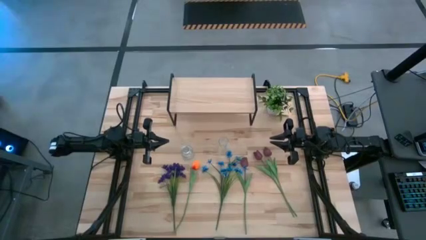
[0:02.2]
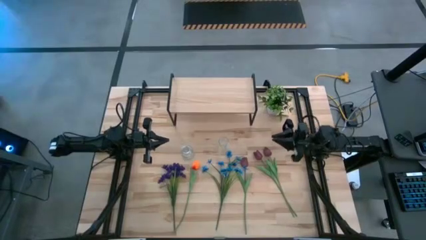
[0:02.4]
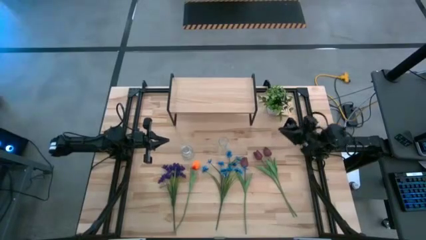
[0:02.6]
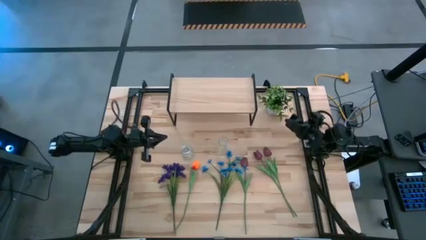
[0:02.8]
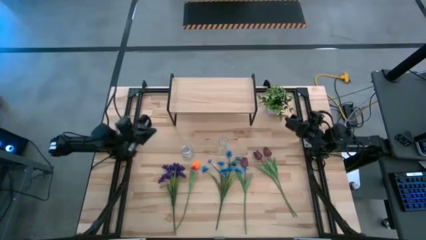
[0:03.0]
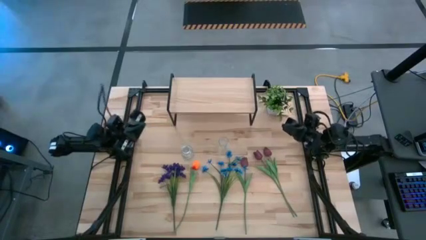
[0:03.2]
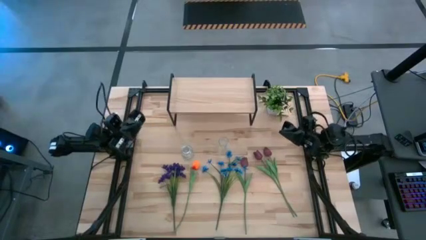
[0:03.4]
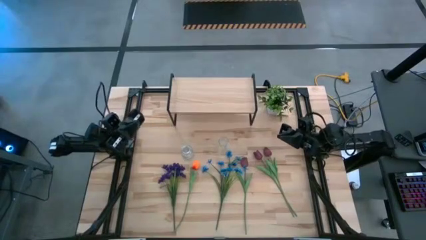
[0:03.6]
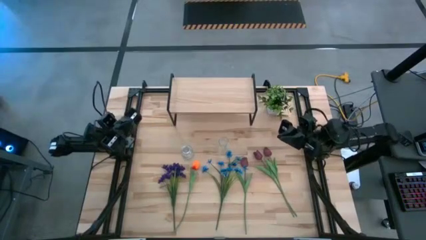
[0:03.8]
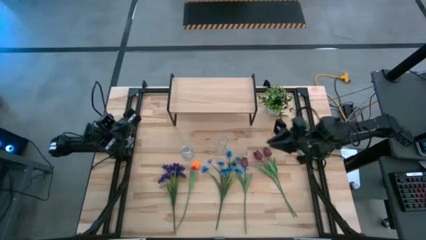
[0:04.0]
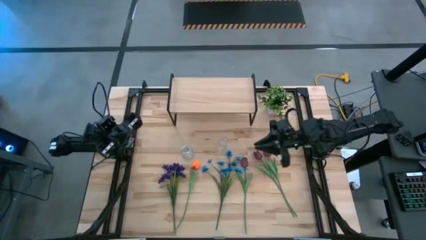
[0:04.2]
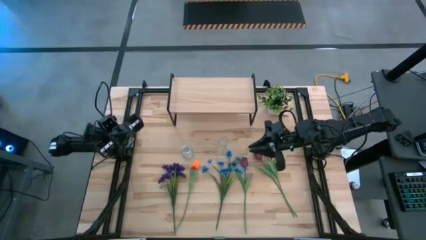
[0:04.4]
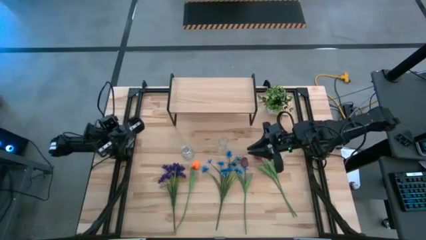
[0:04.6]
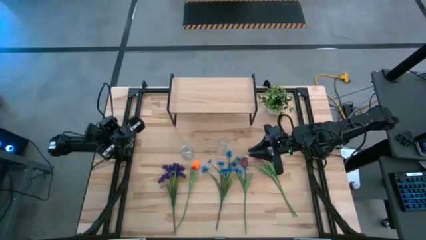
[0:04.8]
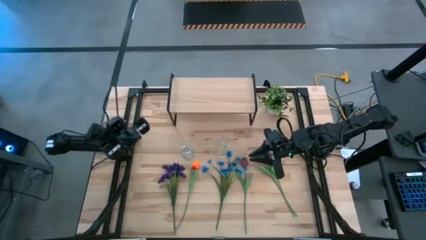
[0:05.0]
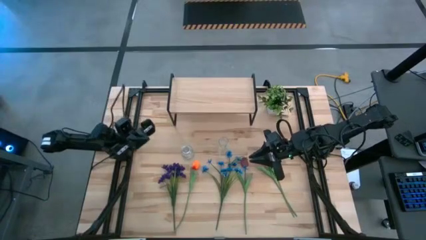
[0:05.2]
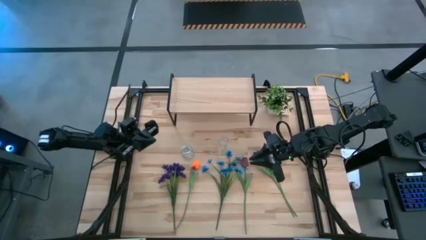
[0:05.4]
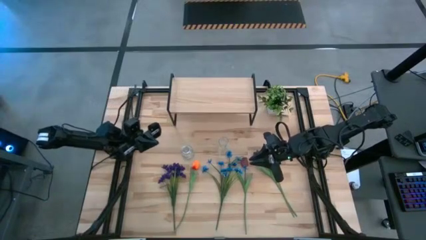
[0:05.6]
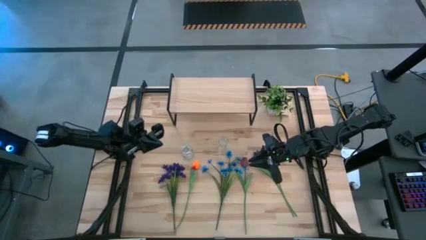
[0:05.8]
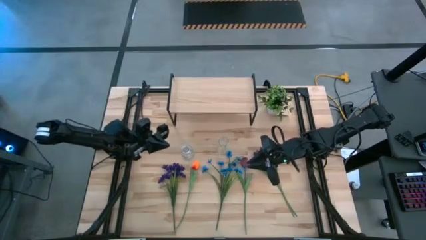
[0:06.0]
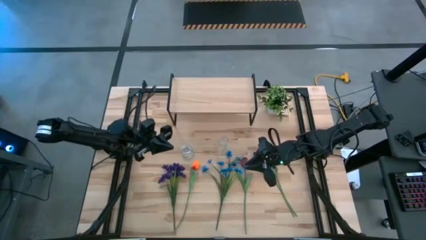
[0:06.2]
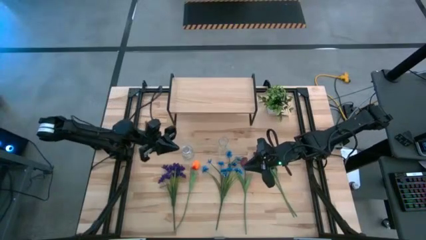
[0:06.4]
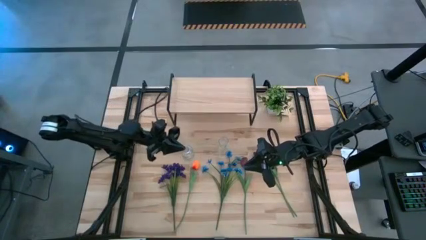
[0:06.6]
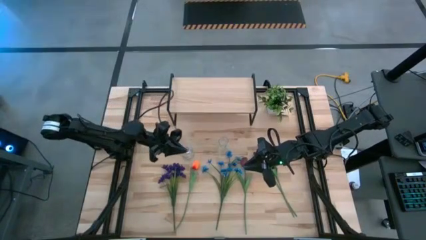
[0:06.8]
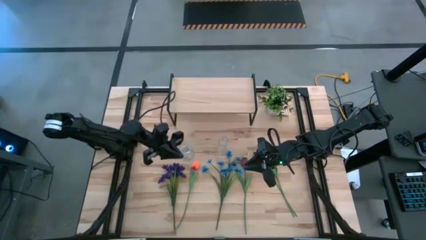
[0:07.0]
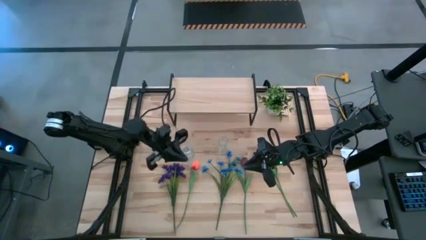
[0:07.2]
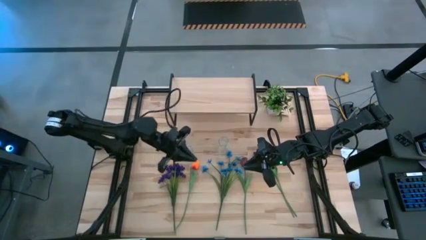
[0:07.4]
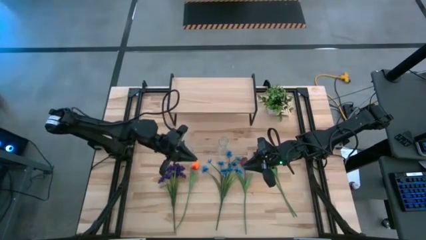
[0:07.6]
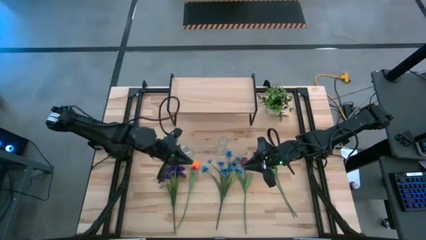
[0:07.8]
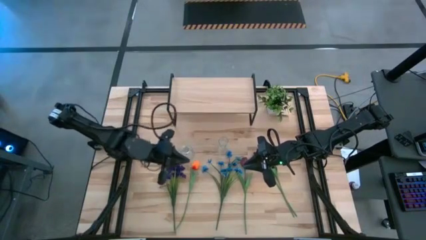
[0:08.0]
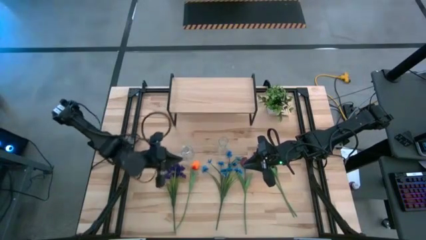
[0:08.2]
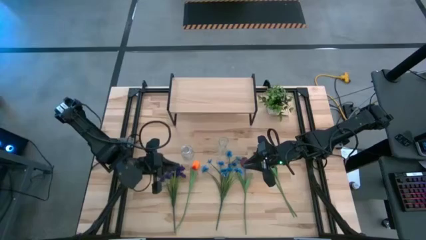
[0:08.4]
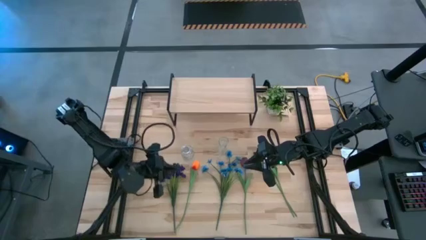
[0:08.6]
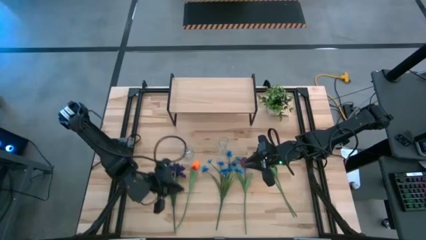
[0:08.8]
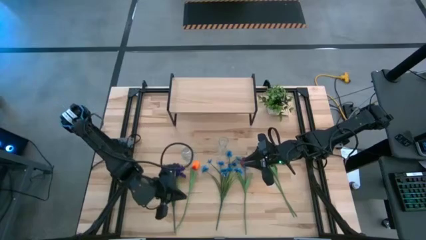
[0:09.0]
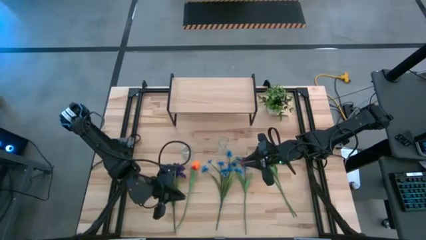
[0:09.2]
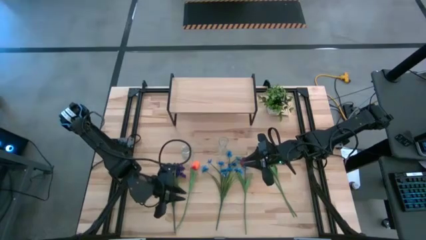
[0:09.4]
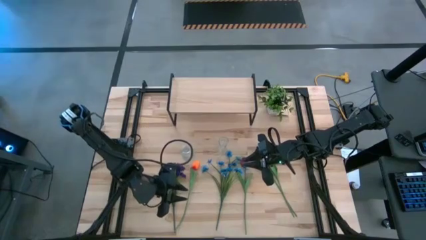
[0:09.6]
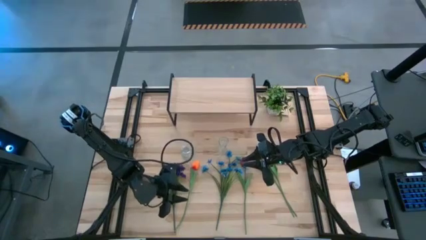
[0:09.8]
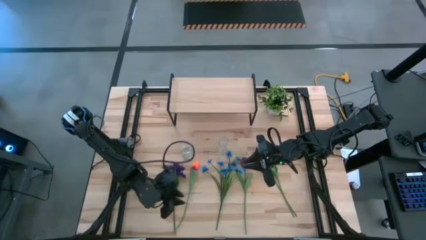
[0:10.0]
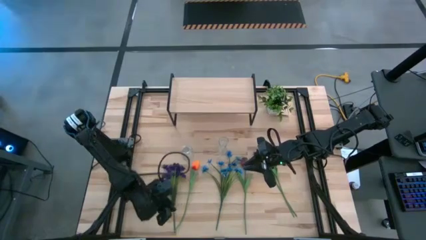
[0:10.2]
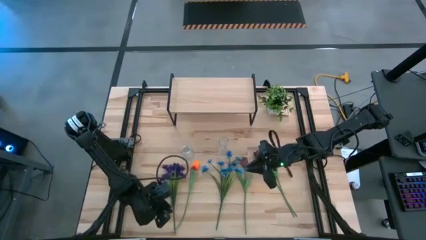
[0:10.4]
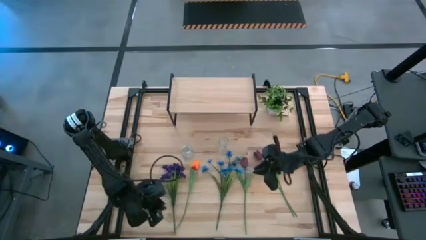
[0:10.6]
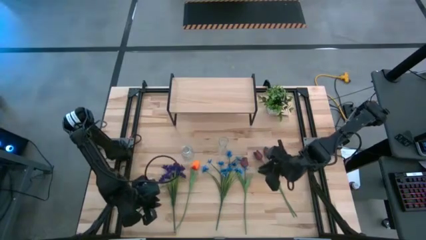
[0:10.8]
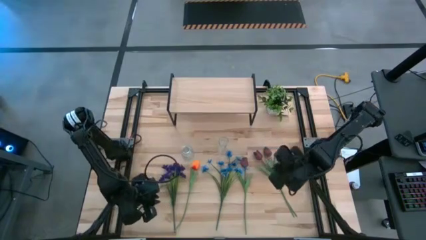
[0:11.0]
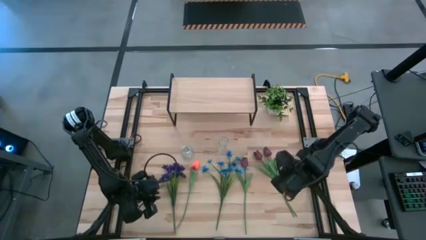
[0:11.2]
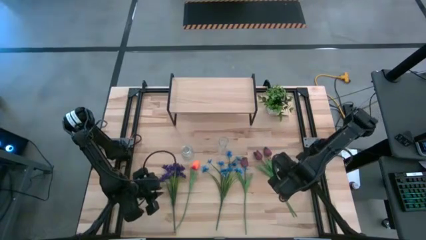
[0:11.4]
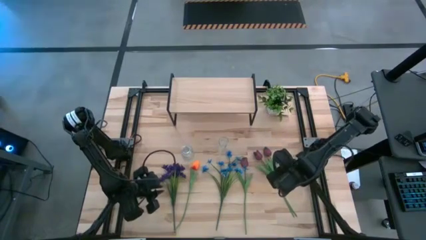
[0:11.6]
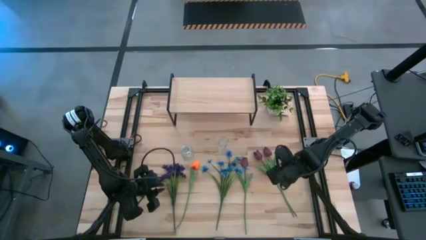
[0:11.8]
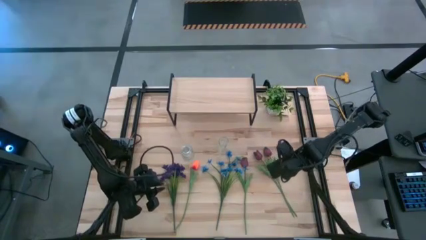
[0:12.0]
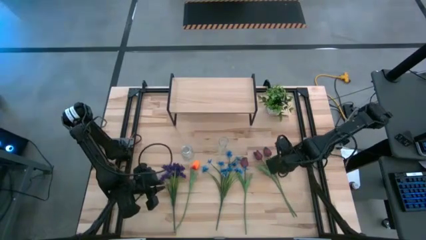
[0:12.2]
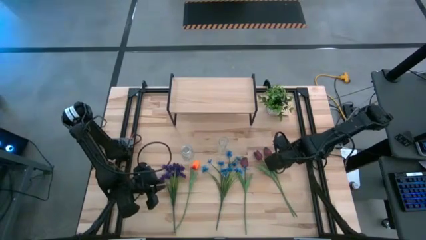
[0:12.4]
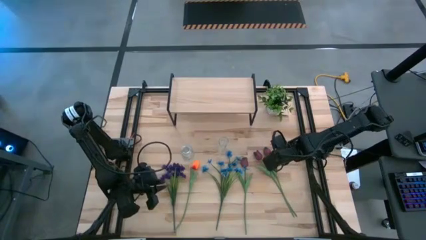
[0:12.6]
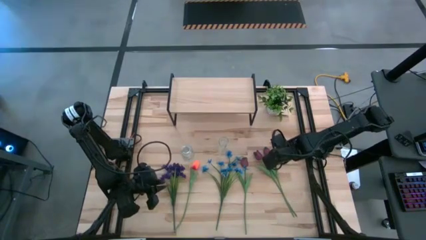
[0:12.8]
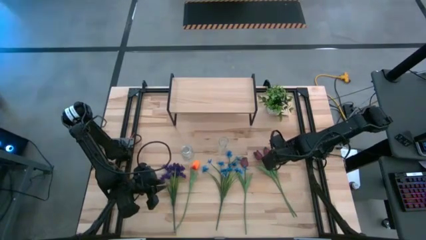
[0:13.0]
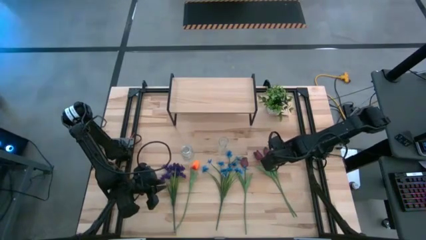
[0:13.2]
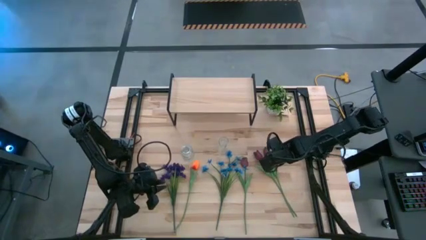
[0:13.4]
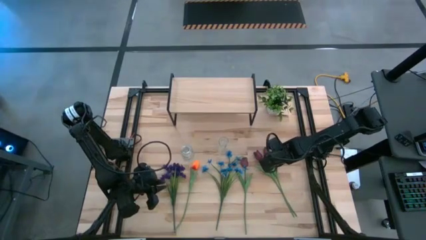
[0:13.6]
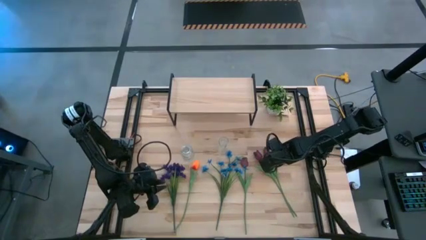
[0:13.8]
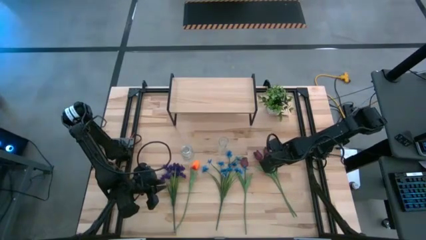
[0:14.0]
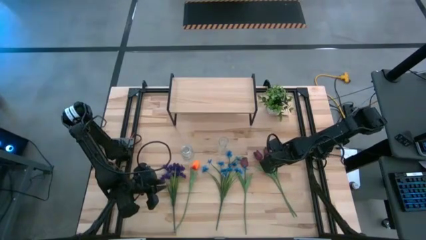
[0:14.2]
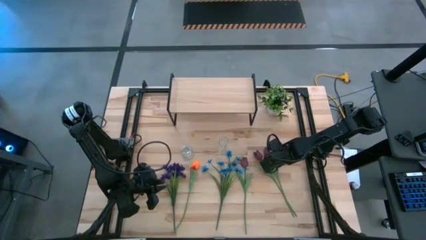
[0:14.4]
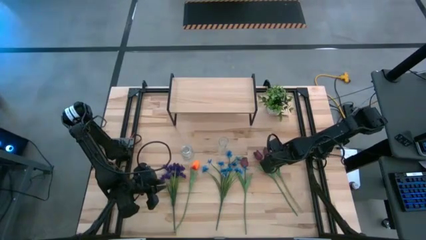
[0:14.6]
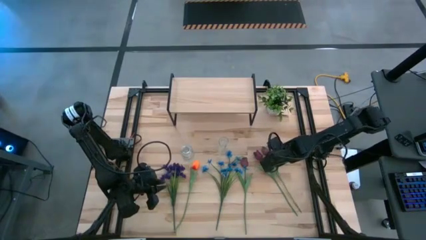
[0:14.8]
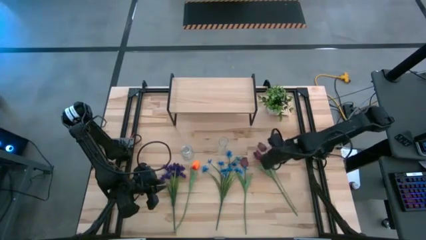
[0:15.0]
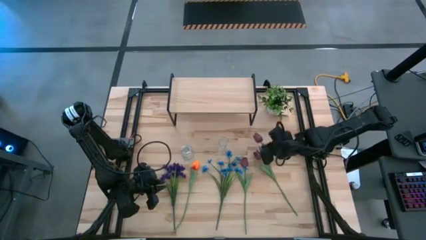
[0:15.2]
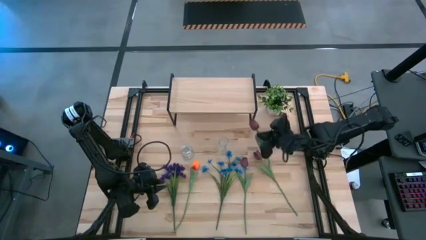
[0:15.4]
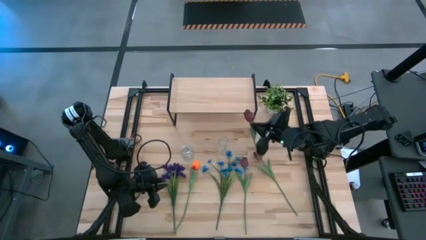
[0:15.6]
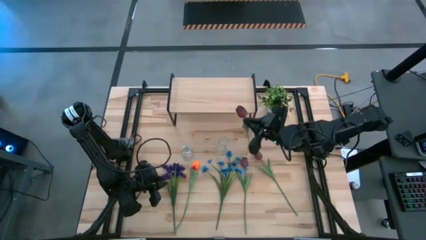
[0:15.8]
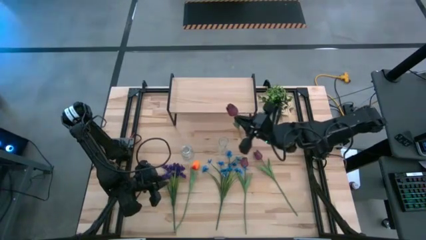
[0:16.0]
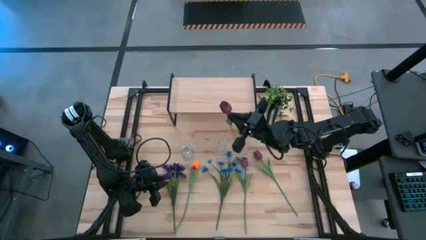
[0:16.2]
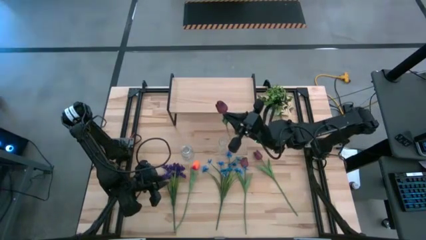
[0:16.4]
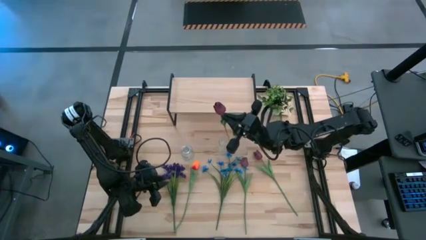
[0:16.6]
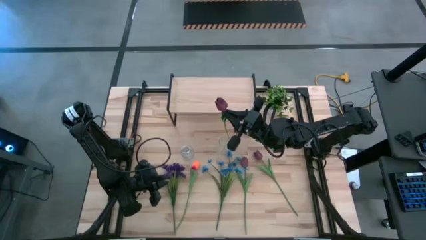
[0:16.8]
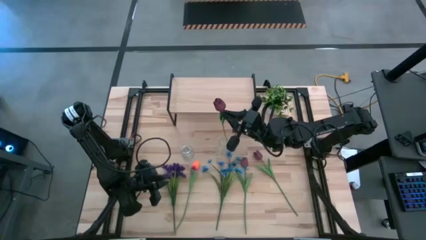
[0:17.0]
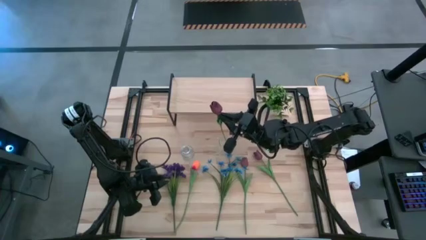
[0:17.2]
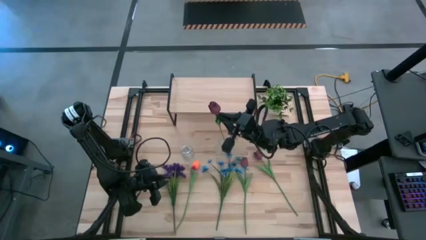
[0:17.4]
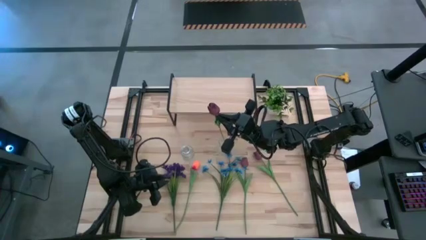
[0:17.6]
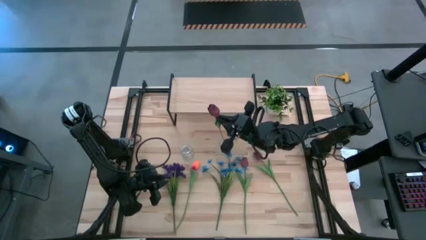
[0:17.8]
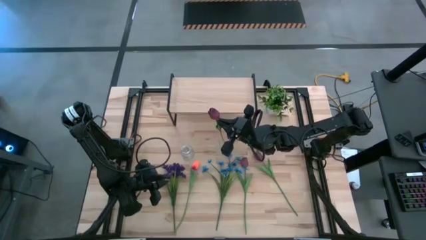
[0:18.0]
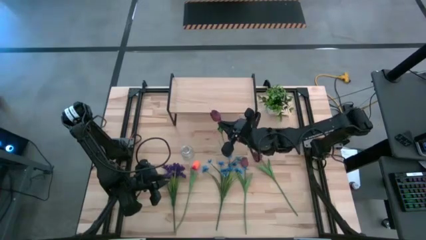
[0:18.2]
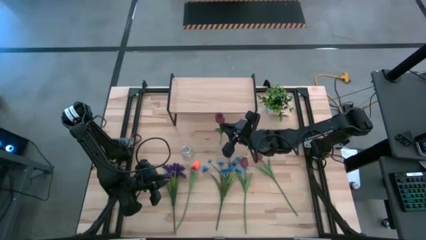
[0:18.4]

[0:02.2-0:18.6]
Task: Pick and place flowers into a vace then onto a shelf
Put the right red tulip into the right transparent vase
